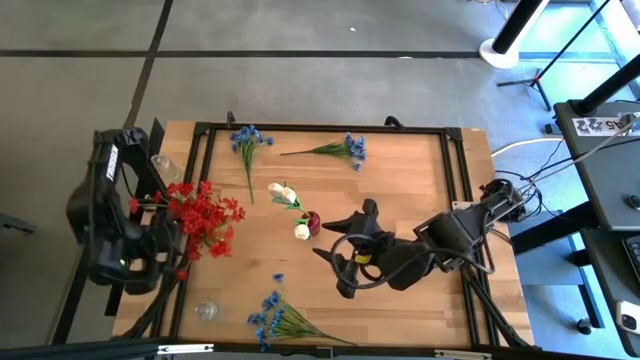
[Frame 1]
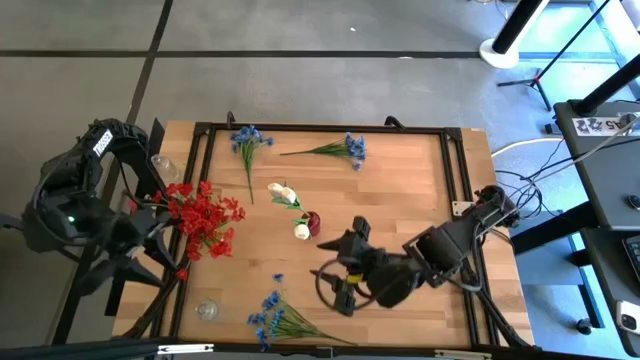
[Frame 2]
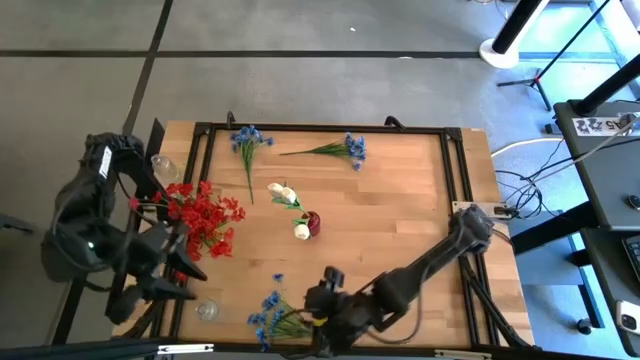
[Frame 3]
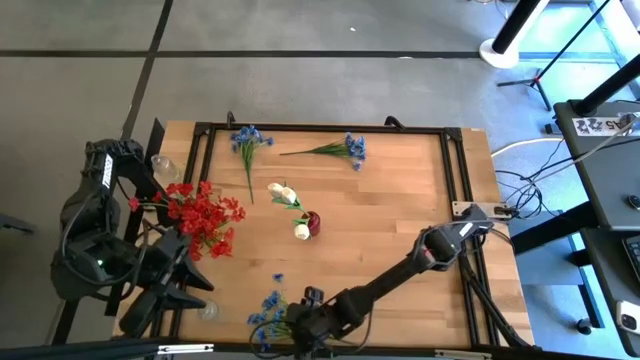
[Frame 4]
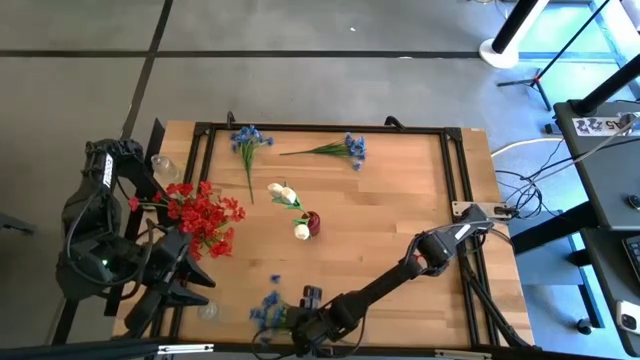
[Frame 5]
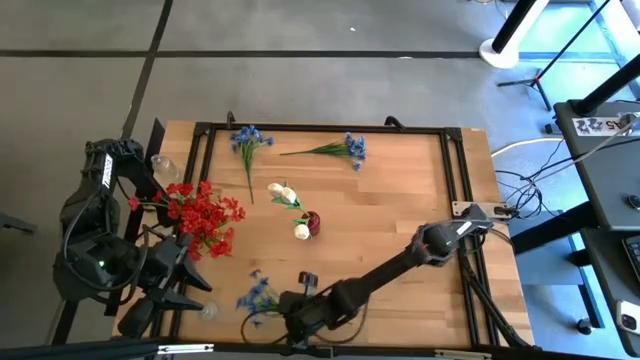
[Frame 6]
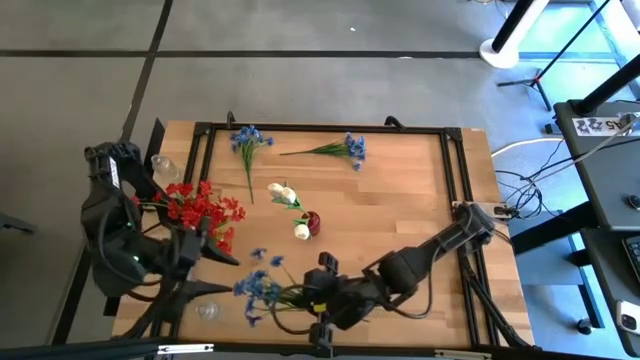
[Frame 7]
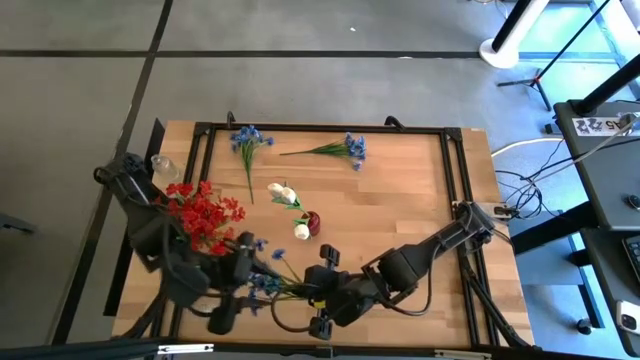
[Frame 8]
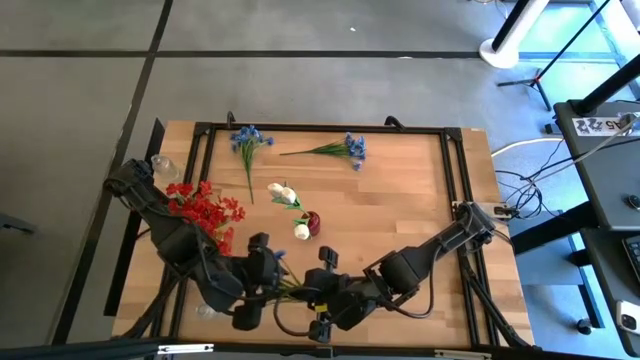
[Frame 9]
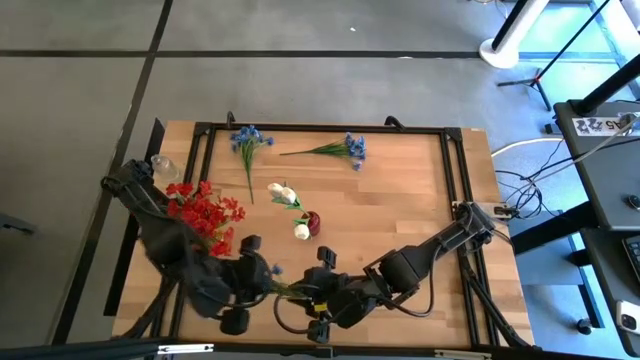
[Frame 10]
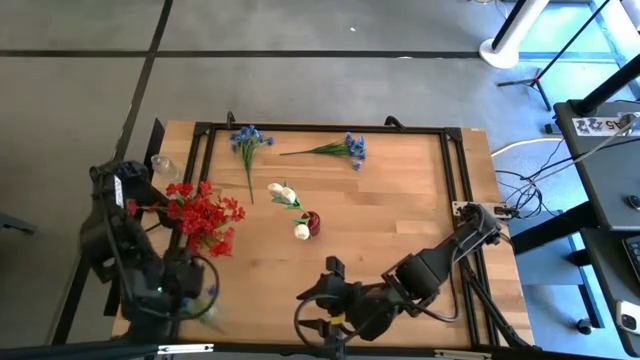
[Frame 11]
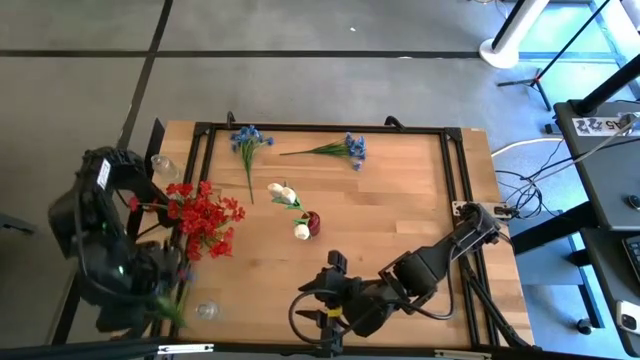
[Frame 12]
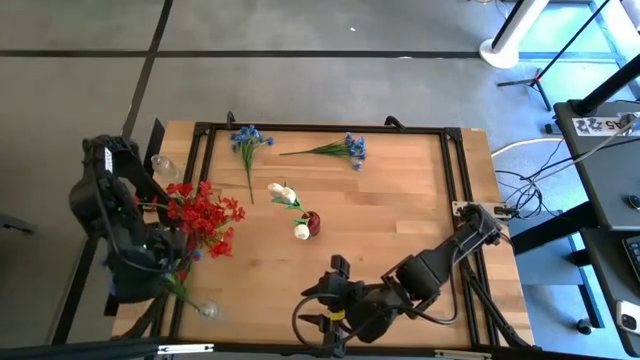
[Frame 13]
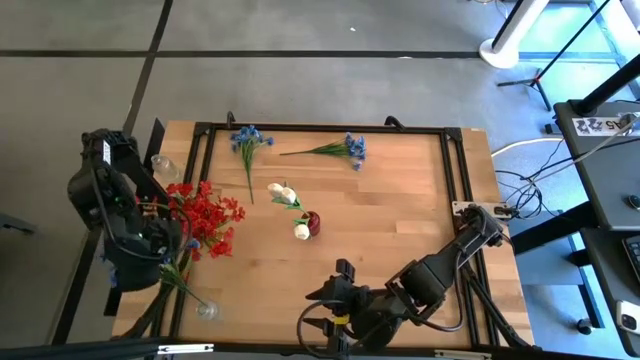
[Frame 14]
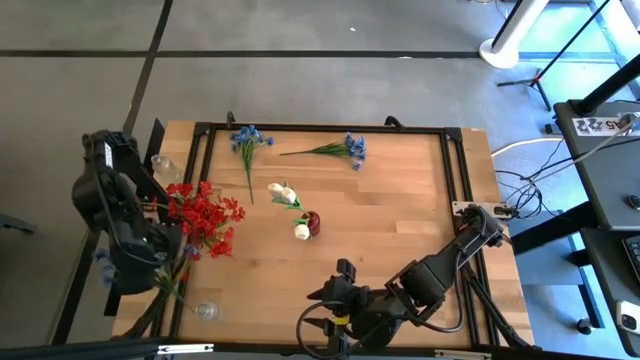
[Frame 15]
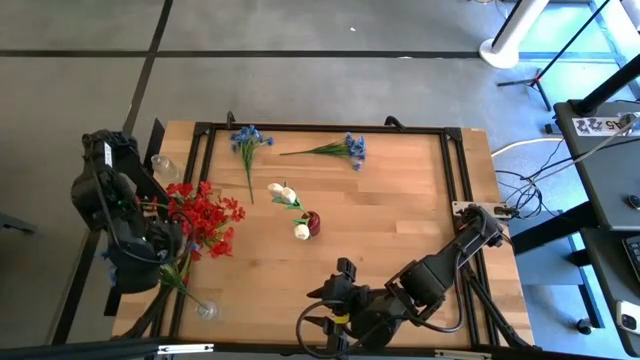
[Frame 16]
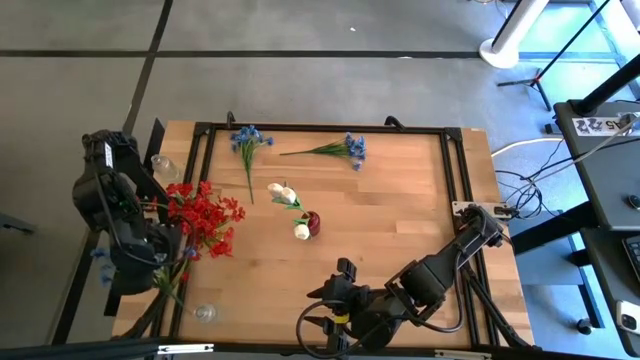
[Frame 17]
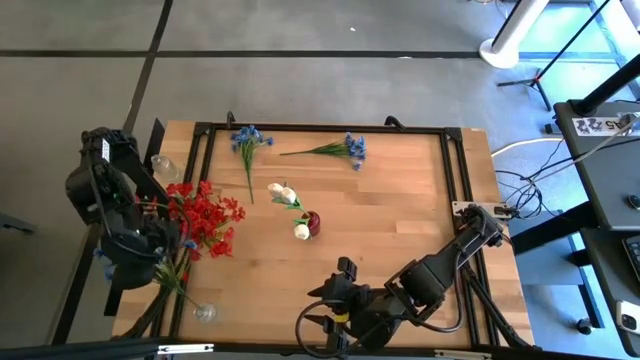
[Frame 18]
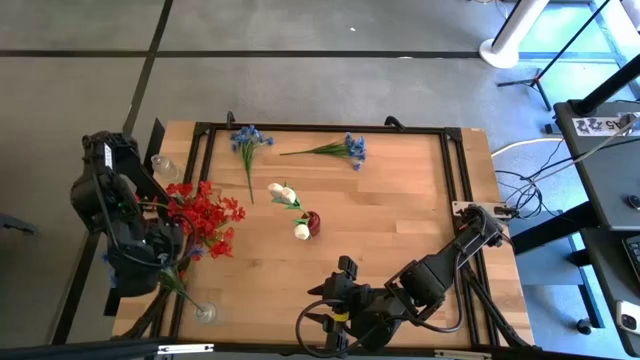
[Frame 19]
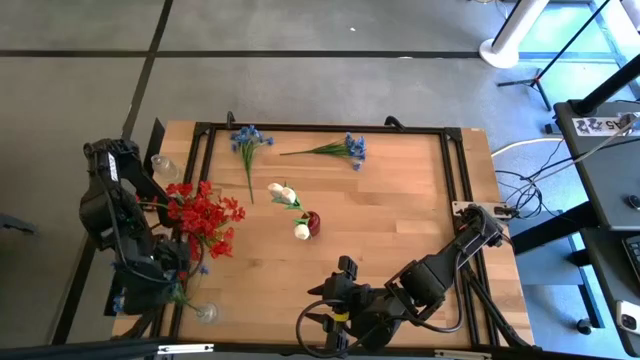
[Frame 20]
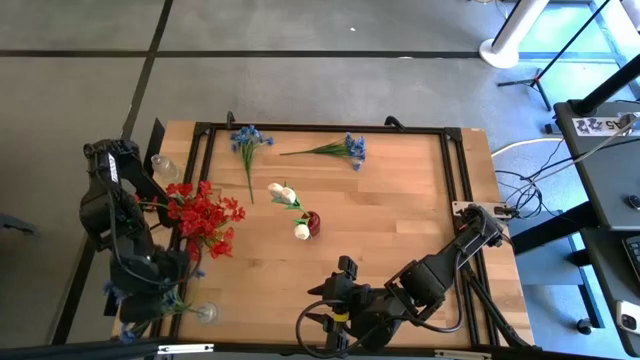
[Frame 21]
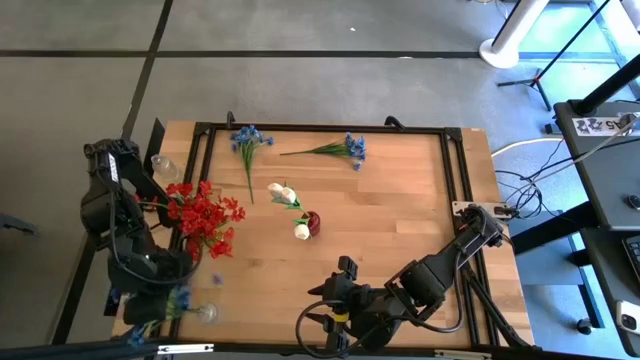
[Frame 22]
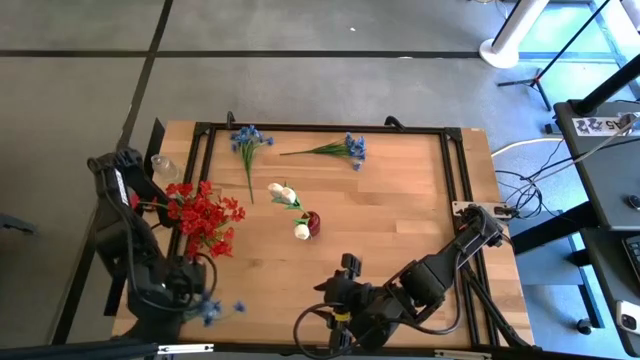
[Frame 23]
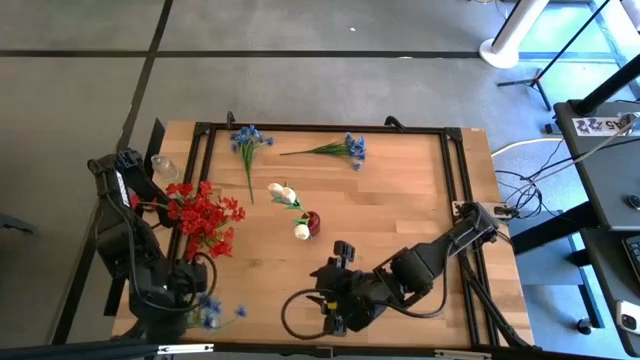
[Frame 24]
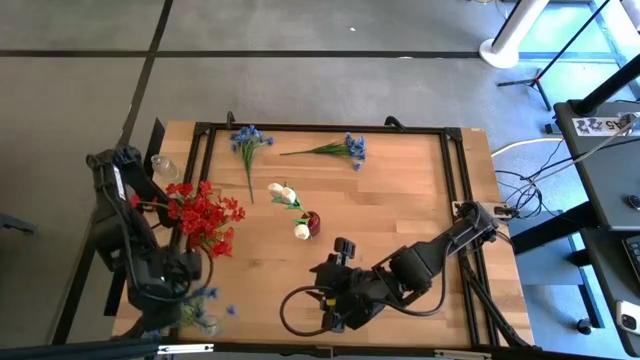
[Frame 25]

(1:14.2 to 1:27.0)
Task: Sort flowers into vase by color
Put the bottom blue flowers into the transparent vase

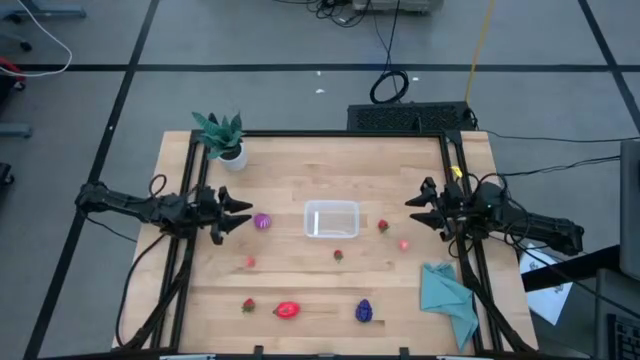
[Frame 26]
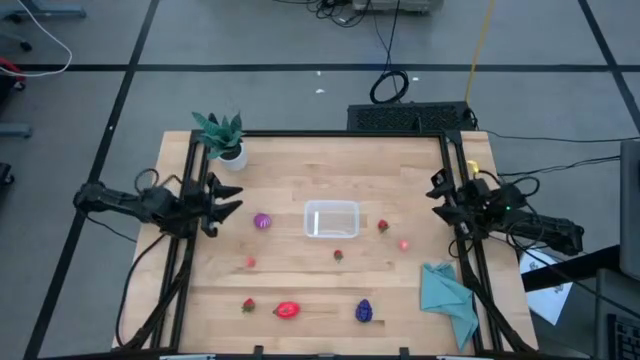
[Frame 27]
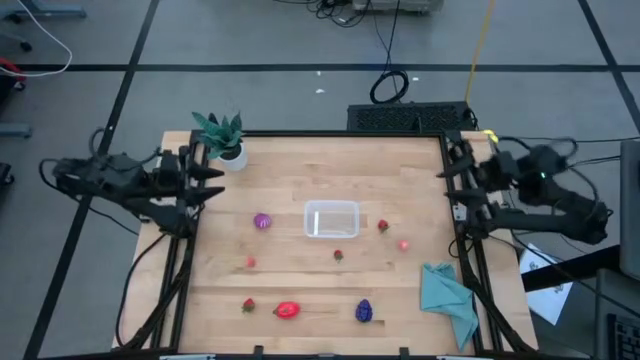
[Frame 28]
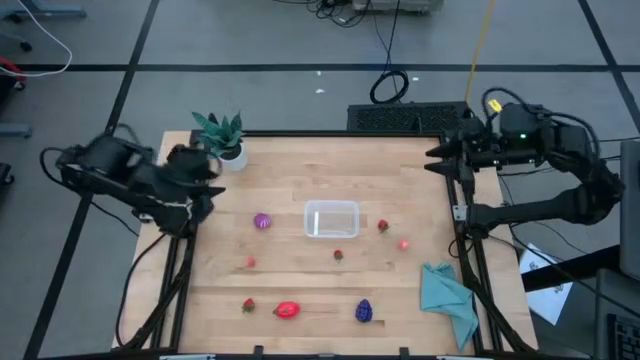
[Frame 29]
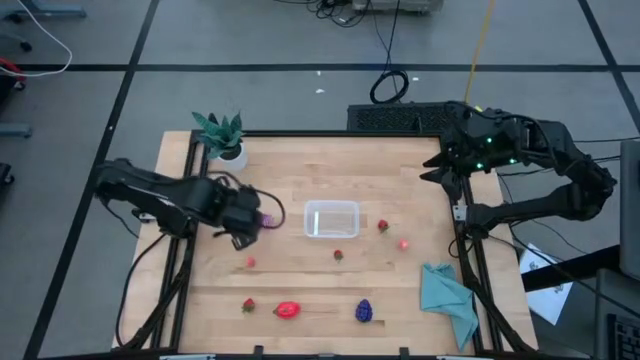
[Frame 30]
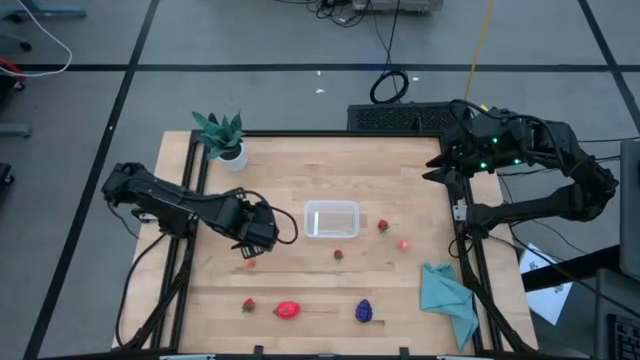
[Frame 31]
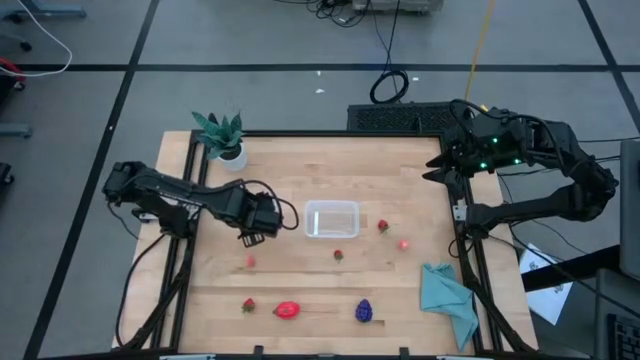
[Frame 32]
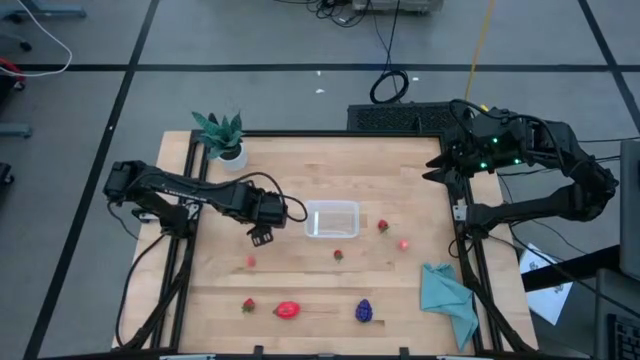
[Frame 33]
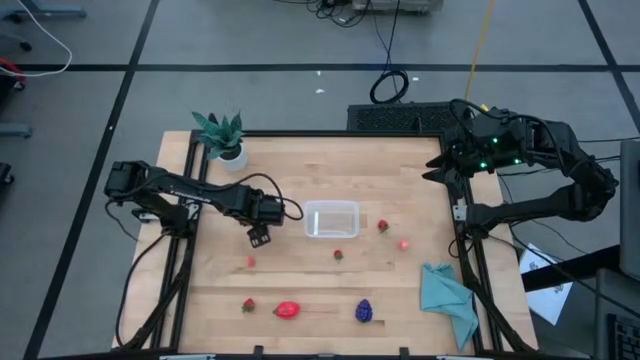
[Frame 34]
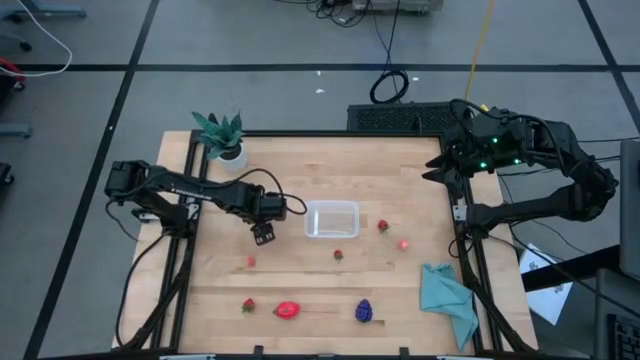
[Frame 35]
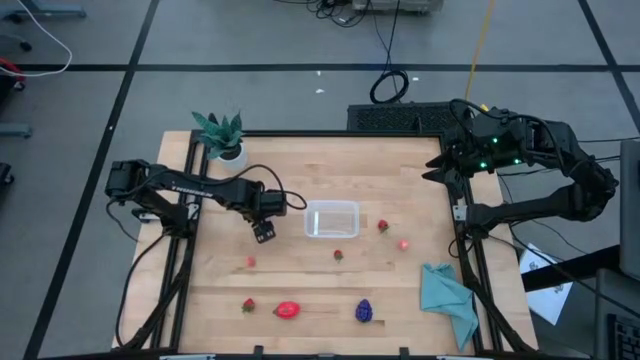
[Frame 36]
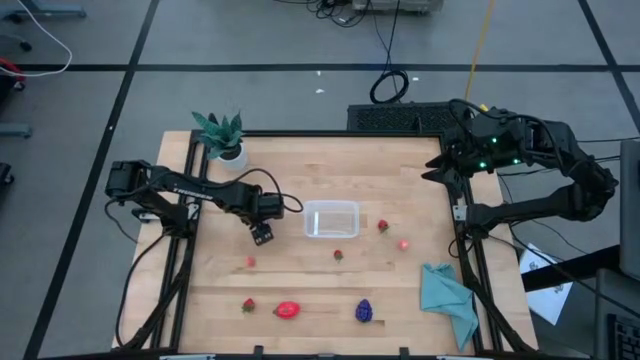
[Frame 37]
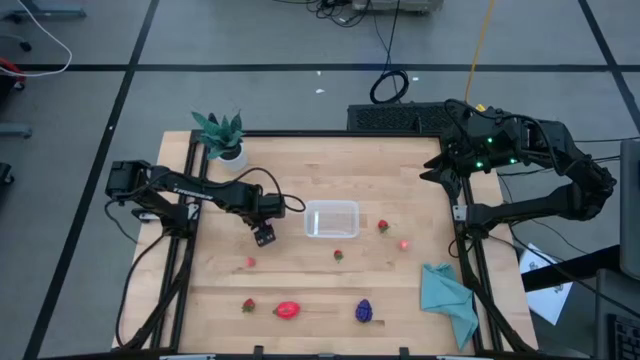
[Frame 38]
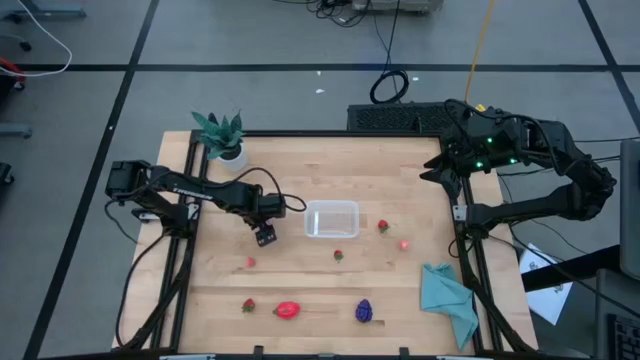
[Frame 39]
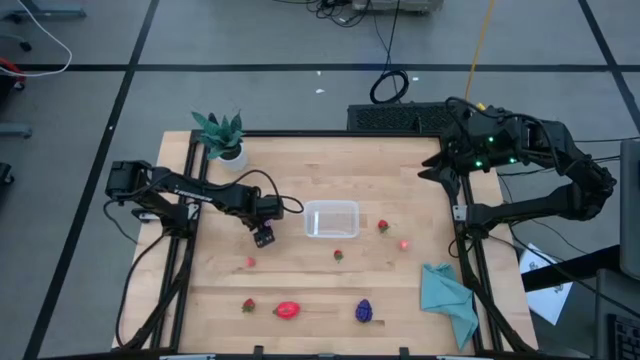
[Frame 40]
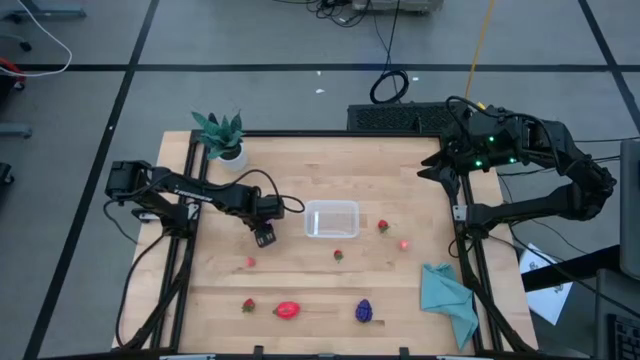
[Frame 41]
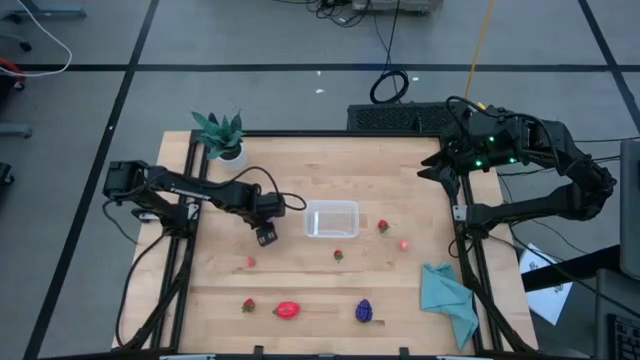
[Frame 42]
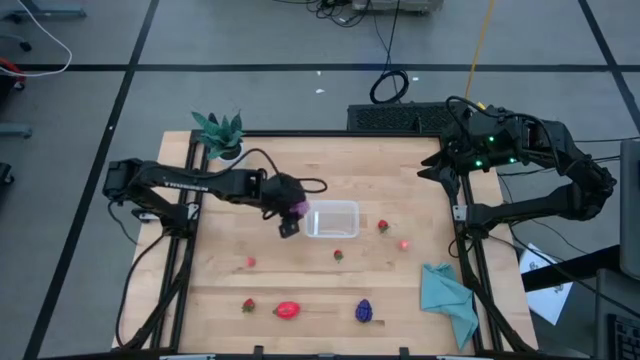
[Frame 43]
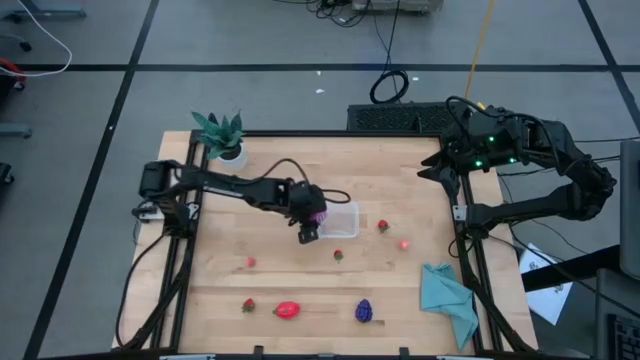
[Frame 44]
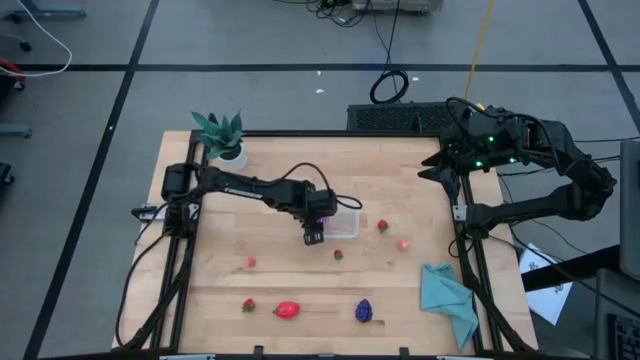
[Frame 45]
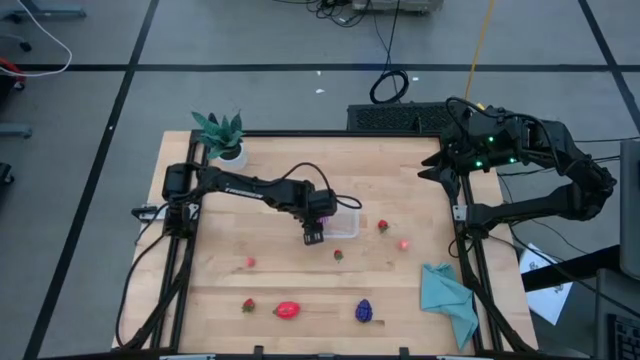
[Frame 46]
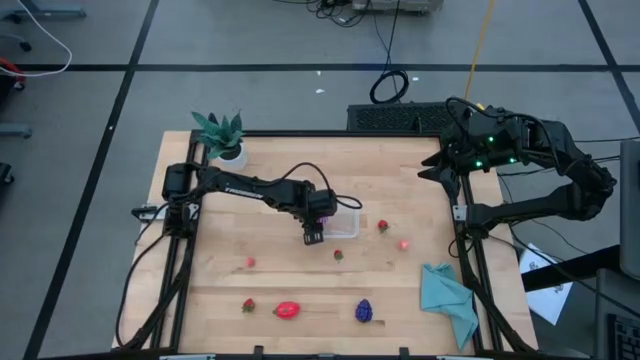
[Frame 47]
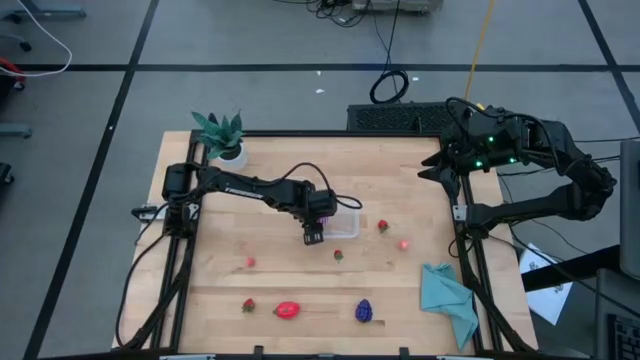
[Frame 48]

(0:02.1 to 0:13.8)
Task: Pick and placing Produce into tupperware
Put the purple onion into the transparent bin
